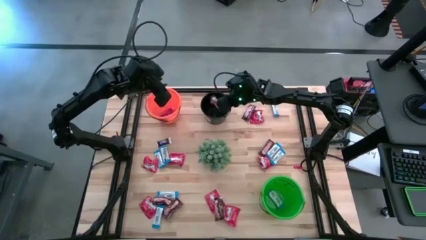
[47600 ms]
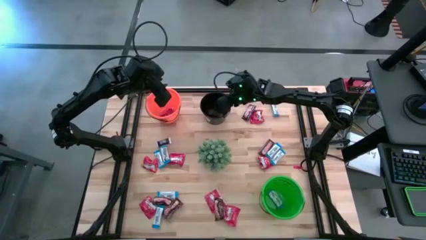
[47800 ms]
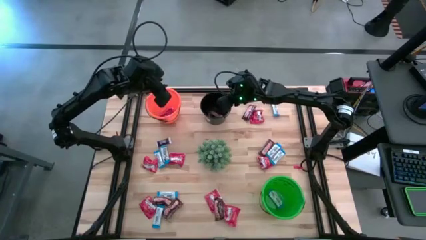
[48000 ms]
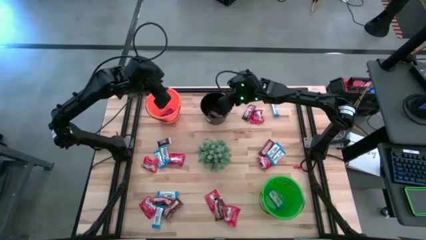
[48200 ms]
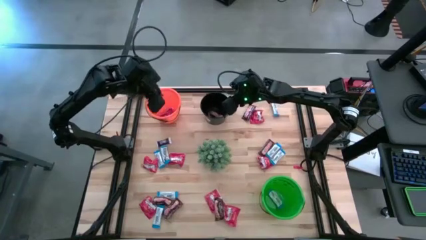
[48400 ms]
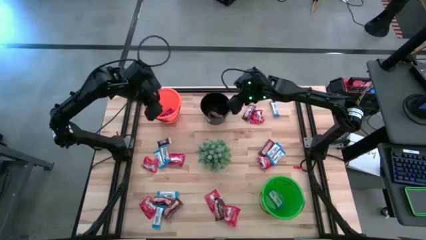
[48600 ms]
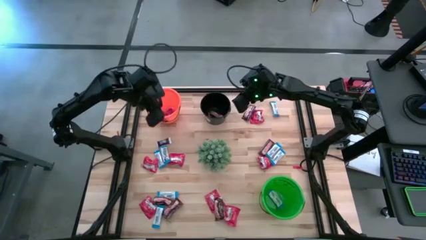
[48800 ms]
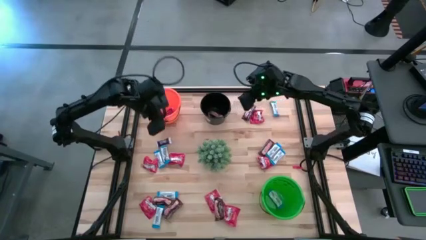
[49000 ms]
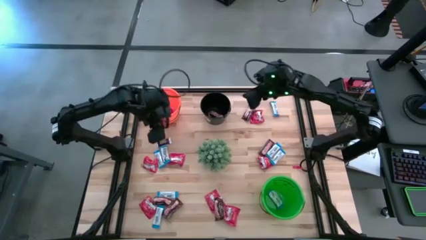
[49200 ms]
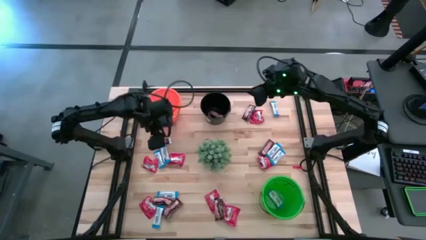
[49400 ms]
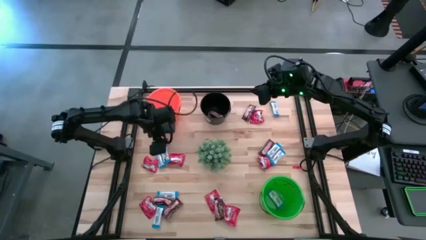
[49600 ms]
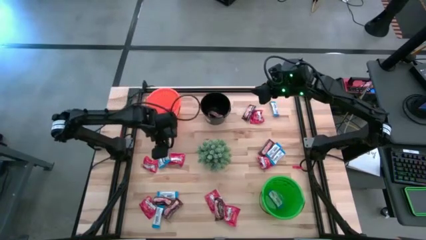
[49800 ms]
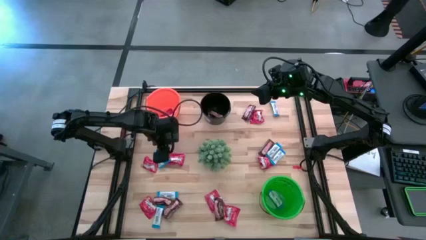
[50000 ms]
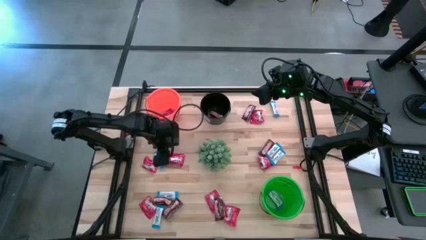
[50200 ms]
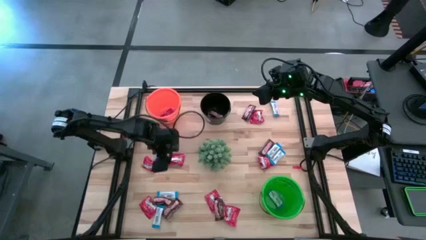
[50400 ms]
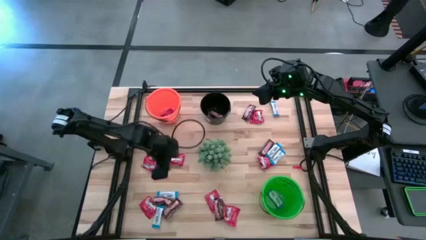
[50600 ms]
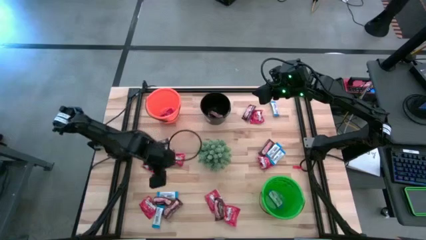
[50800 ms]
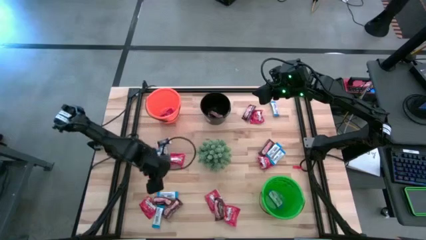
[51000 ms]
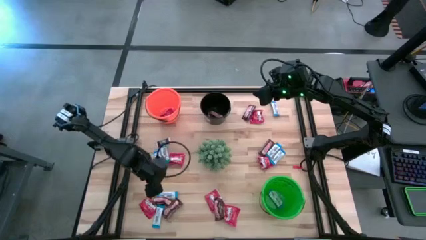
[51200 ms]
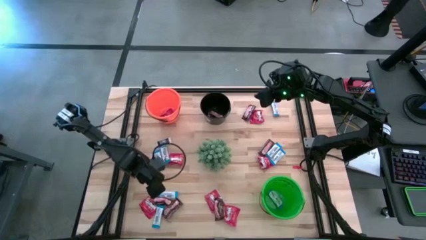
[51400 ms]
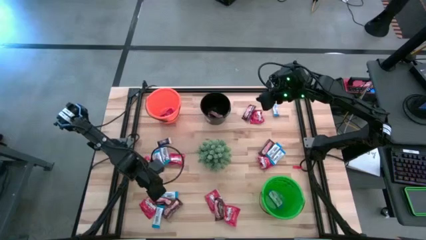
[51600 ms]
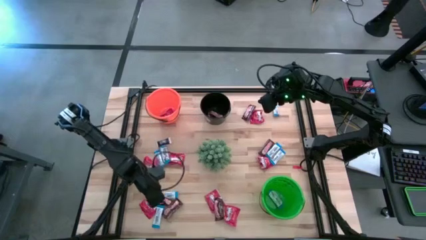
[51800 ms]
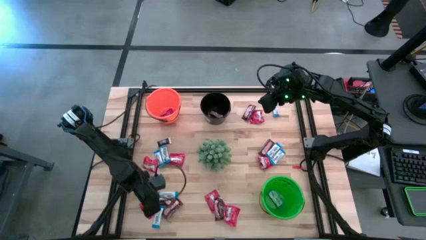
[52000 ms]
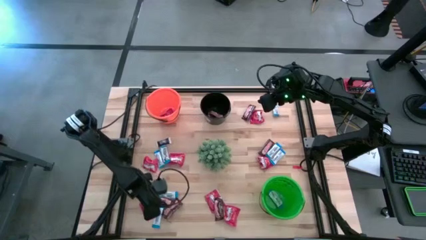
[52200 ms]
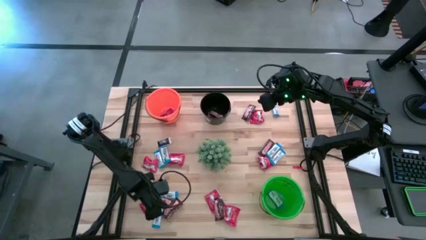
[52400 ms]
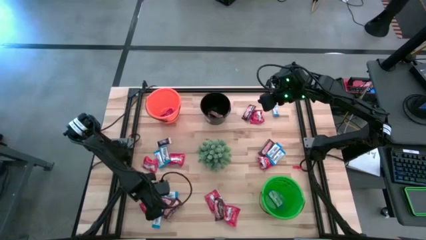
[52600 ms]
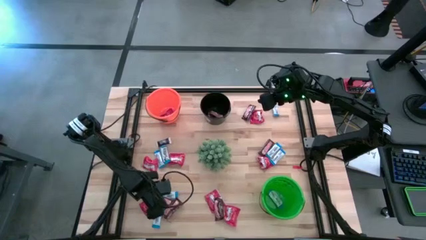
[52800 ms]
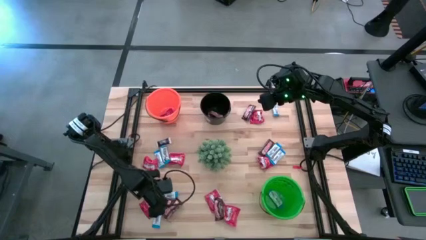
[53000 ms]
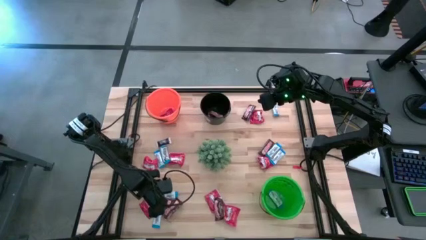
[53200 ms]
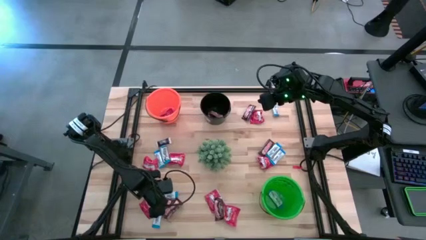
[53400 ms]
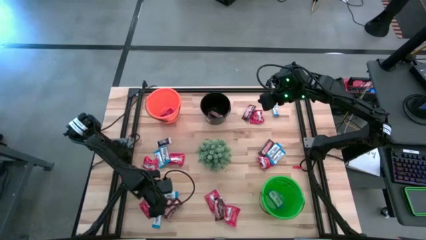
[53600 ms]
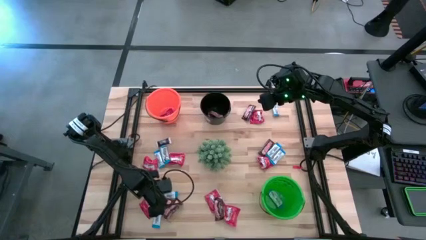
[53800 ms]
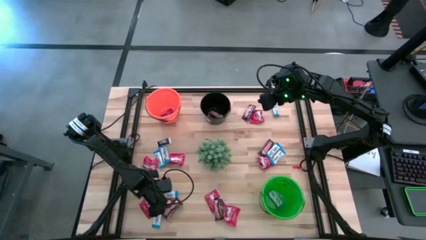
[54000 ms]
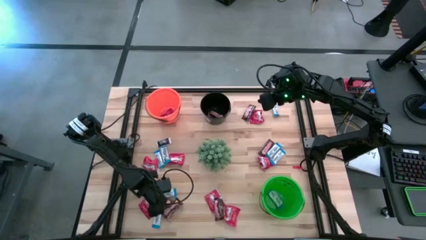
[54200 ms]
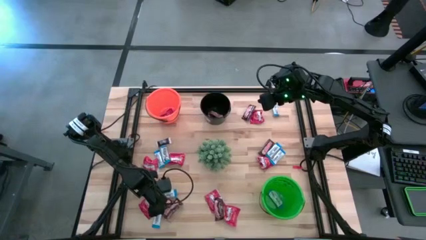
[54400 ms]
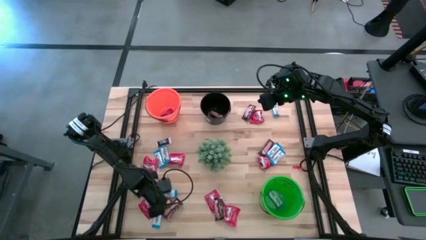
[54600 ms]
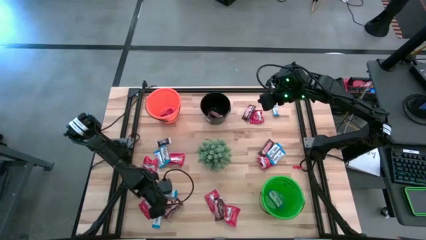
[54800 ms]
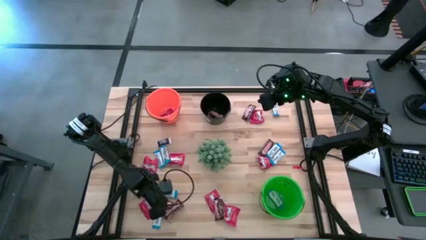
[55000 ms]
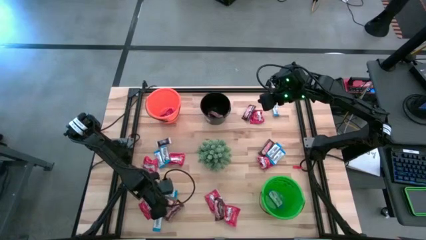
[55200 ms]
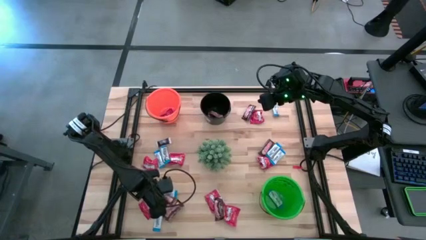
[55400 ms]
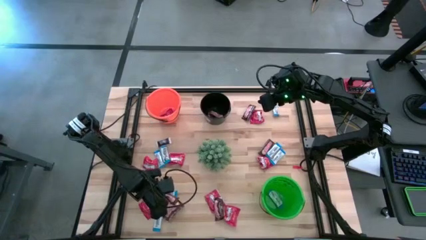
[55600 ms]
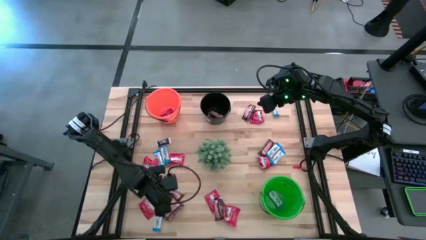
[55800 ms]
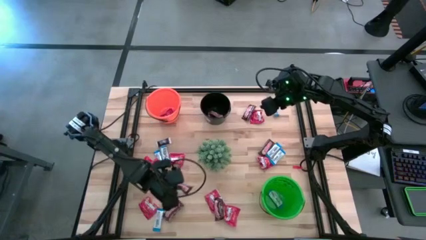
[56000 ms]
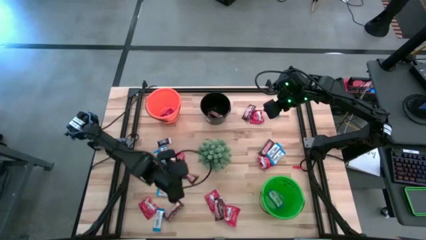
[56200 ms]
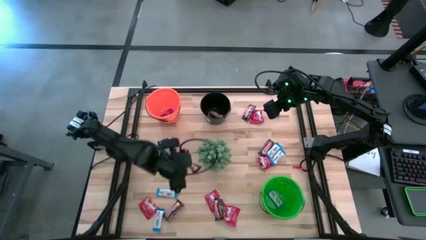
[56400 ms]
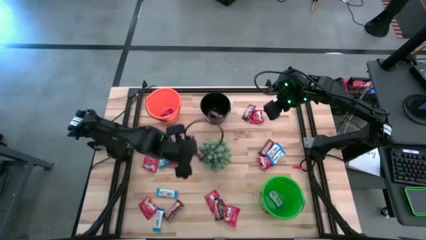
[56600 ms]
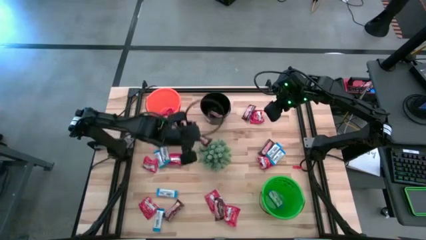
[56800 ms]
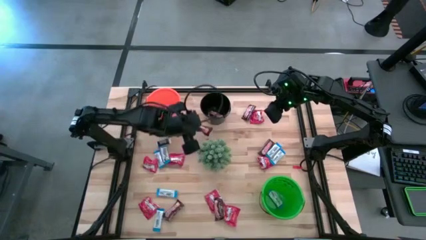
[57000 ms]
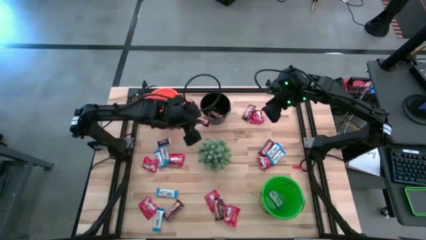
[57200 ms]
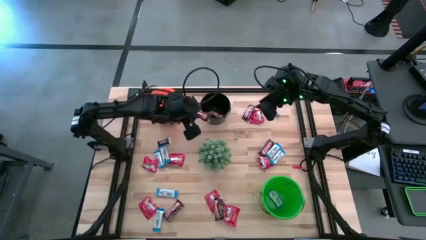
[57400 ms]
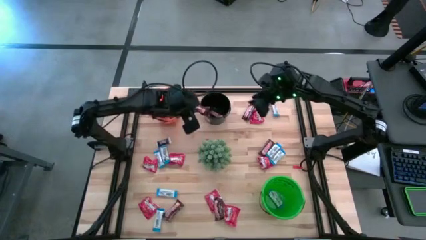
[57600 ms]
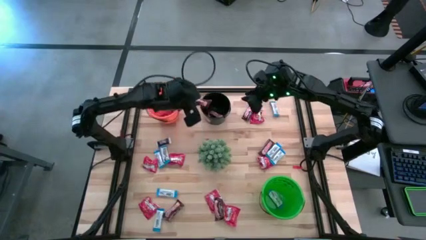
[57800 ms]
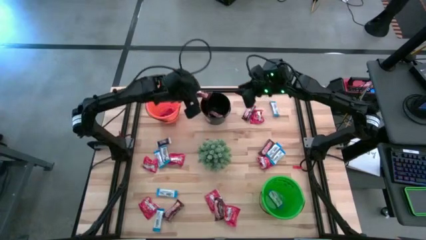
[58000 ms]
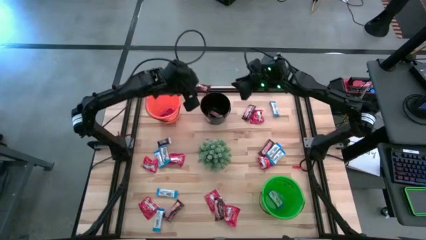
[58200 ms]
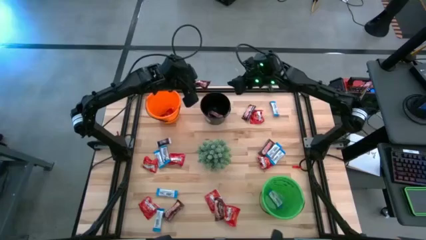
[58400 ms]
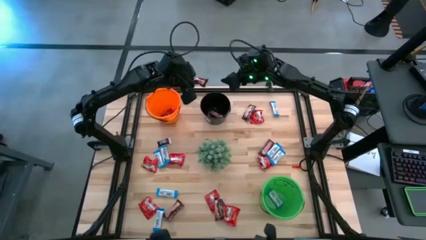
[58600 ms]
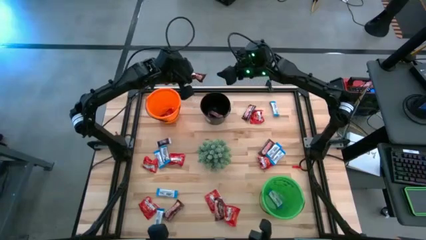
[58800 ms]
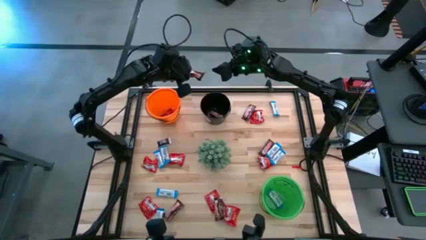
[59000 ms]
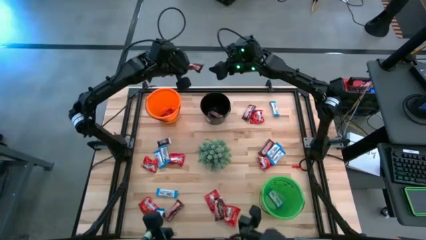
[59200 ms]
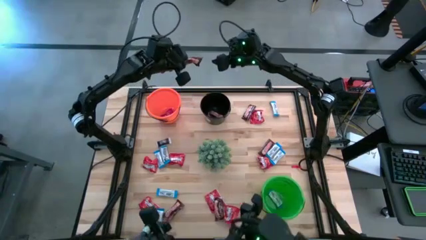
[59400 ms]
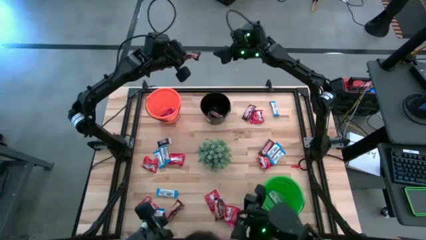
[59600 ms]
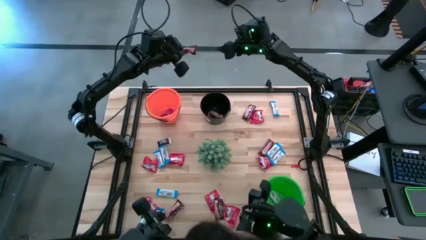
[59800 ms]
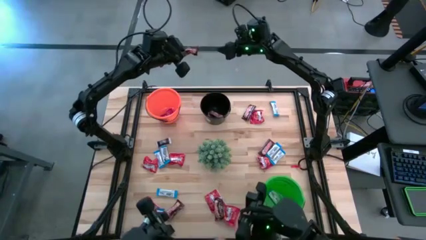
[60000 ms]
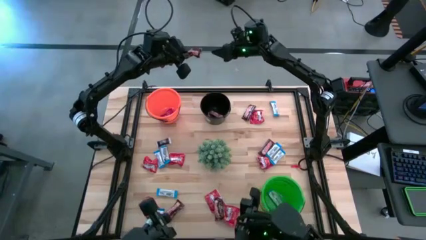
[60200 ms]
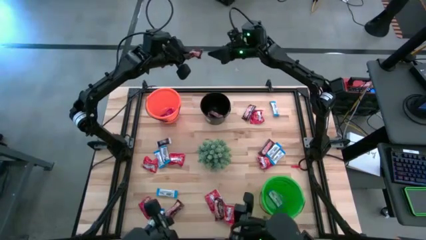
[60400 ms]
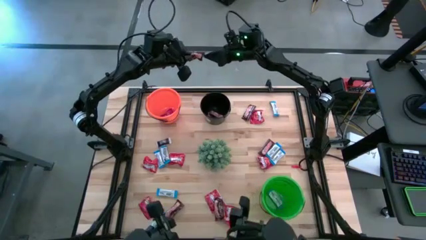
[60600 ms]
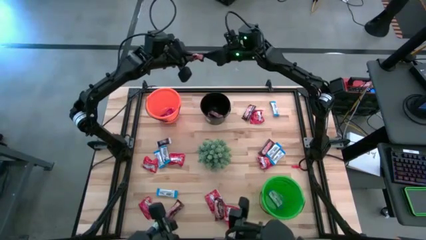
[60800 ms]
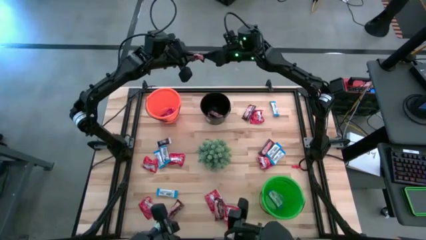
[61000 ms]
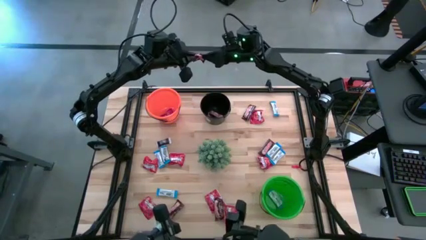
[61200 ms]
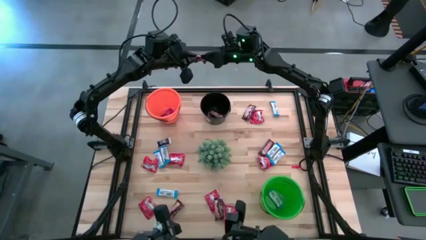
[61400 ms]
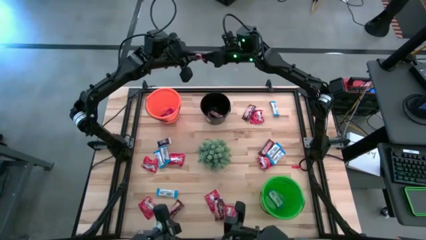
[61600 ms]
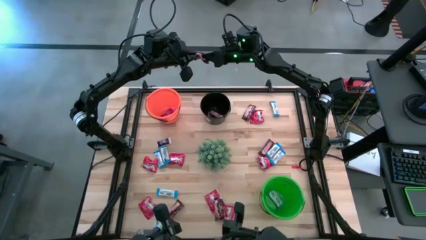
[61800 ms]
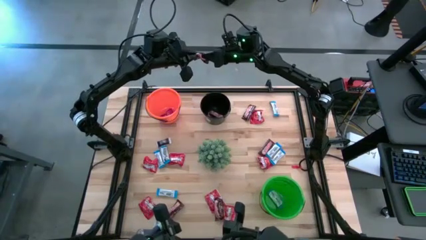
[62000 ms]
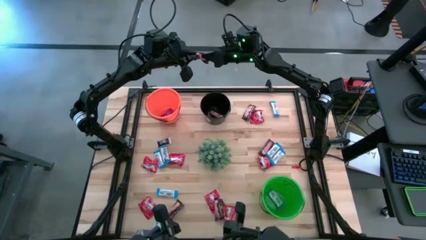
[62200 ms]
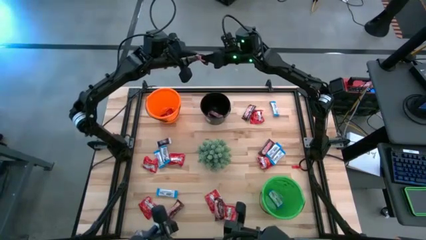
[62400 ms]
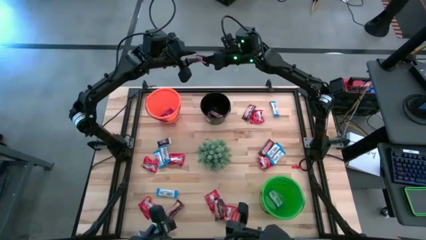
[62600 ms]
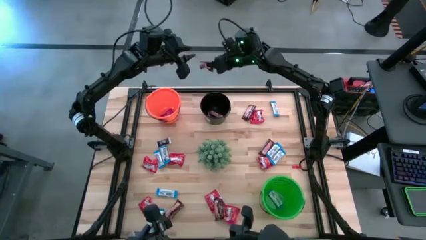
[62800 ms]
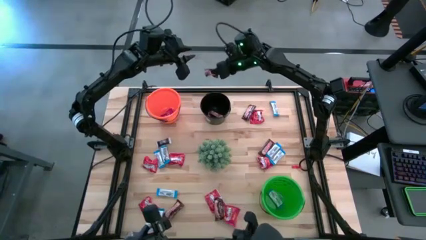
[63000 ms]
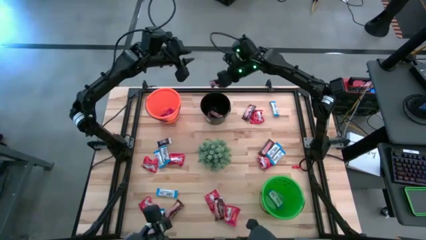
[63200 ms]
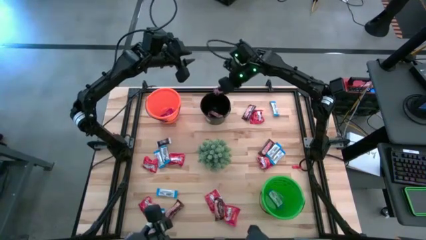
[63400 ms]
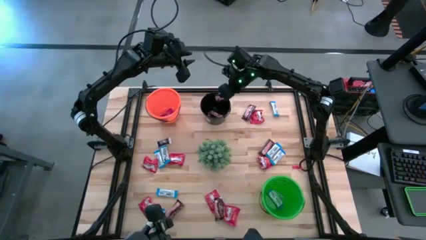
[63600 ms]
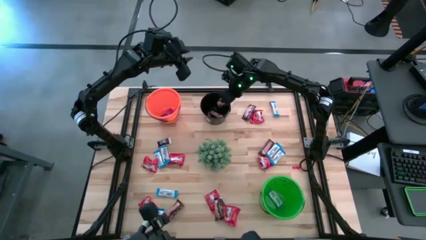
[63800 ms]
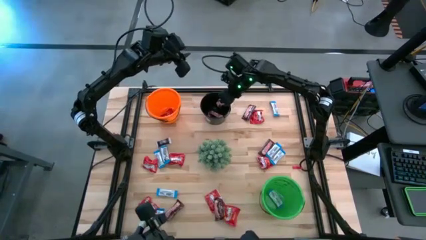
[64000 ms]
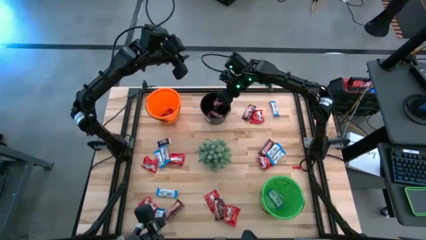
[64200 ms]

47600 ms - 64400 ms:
Task: Sort candy
Put the brown chocolate into the black bucket
